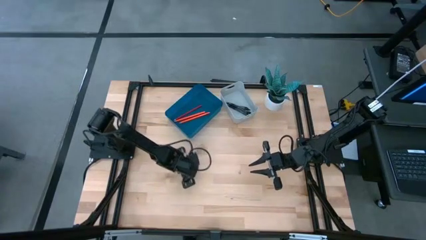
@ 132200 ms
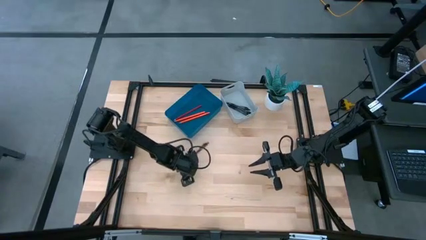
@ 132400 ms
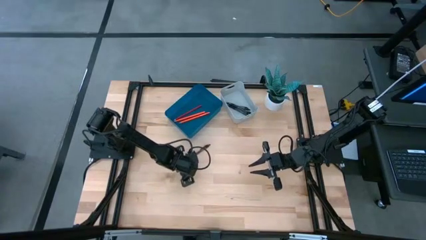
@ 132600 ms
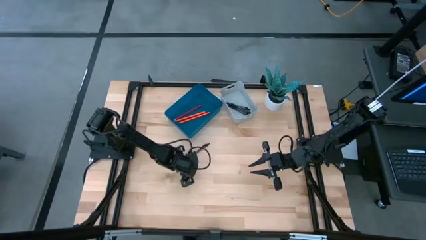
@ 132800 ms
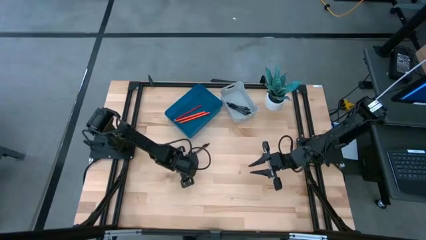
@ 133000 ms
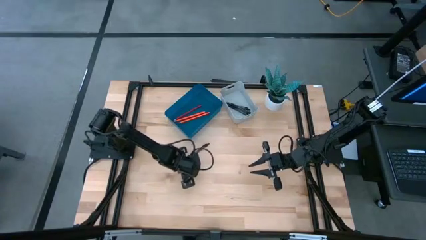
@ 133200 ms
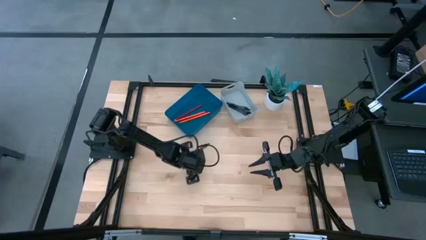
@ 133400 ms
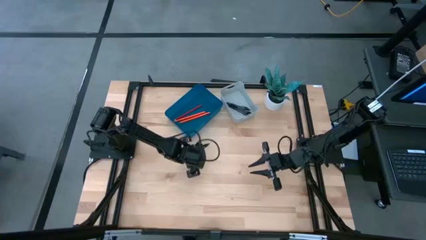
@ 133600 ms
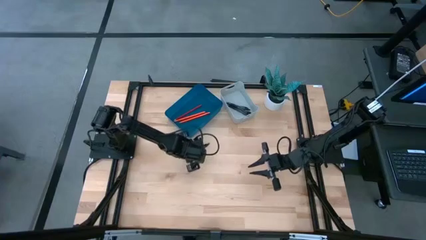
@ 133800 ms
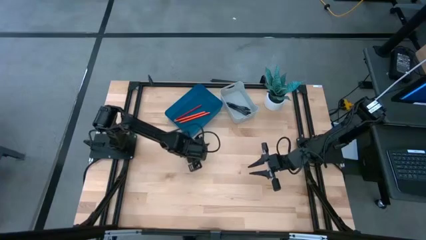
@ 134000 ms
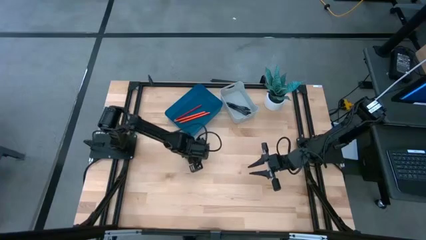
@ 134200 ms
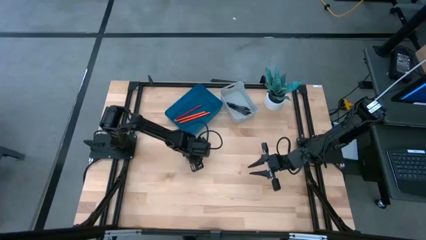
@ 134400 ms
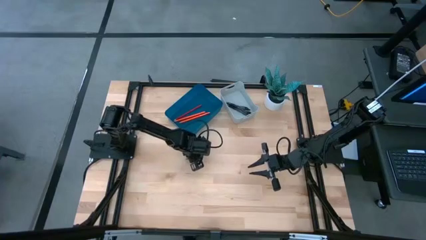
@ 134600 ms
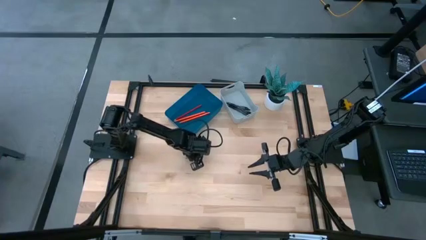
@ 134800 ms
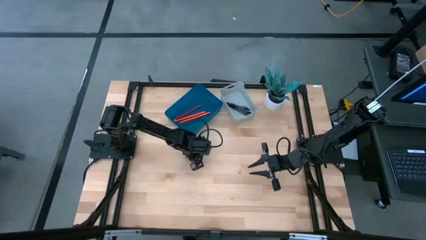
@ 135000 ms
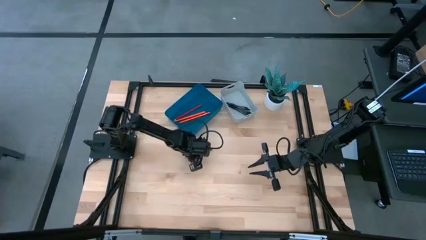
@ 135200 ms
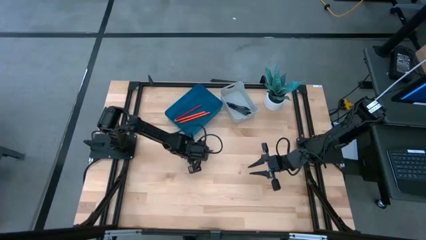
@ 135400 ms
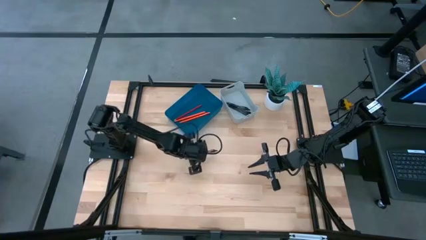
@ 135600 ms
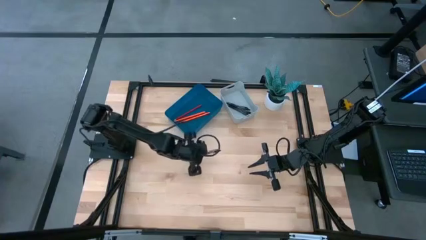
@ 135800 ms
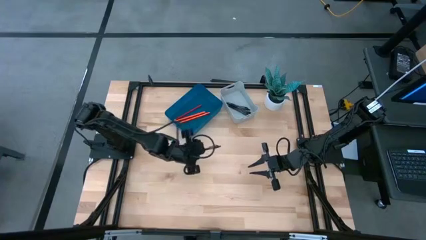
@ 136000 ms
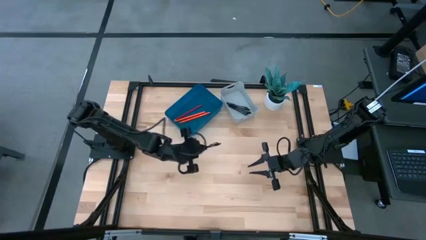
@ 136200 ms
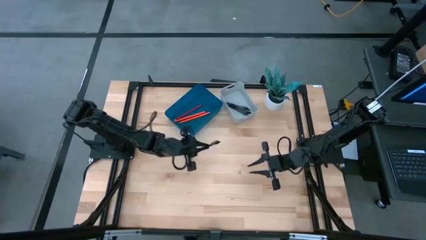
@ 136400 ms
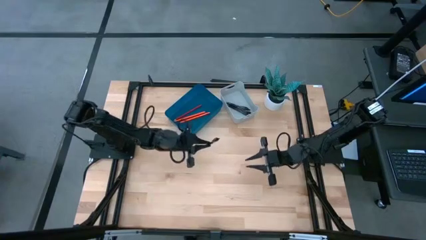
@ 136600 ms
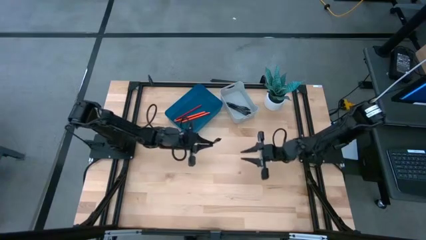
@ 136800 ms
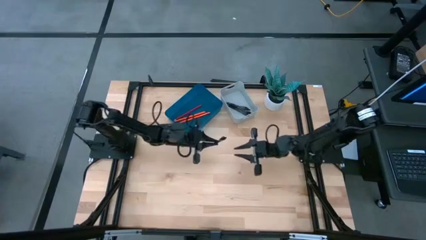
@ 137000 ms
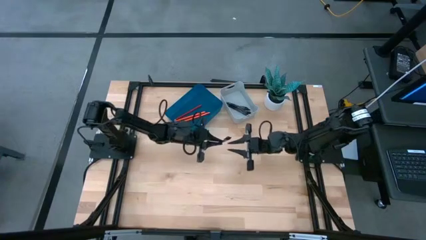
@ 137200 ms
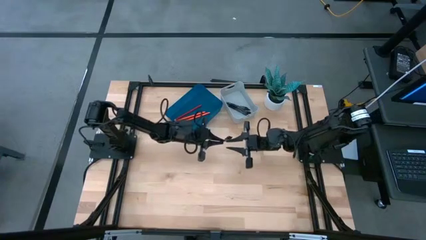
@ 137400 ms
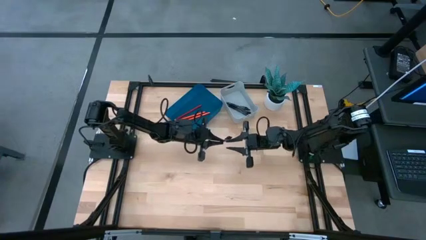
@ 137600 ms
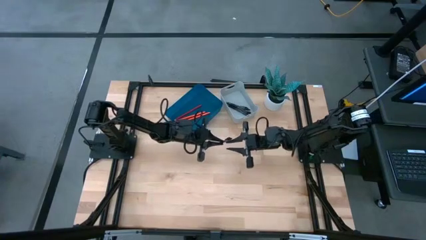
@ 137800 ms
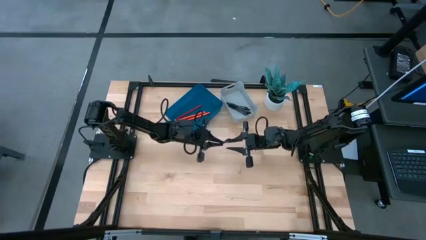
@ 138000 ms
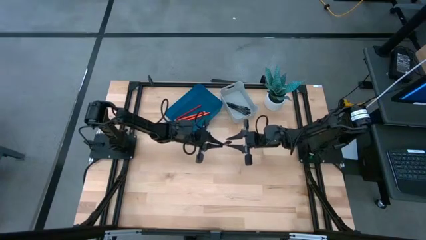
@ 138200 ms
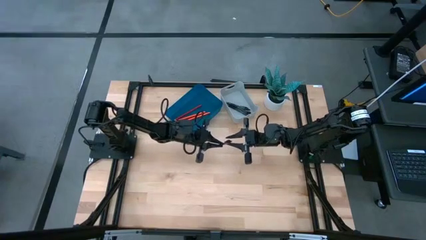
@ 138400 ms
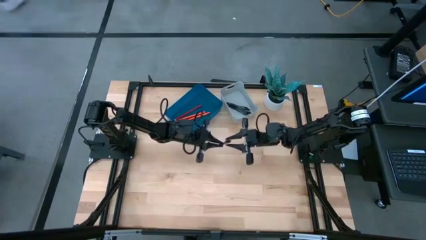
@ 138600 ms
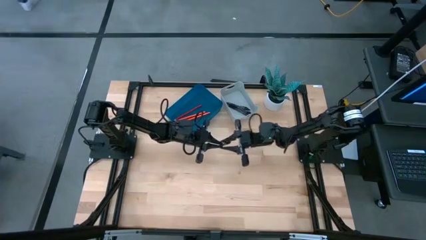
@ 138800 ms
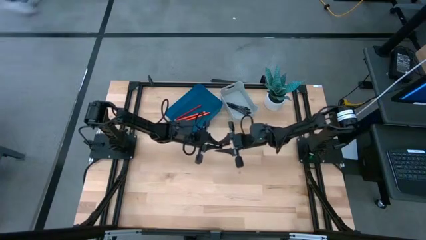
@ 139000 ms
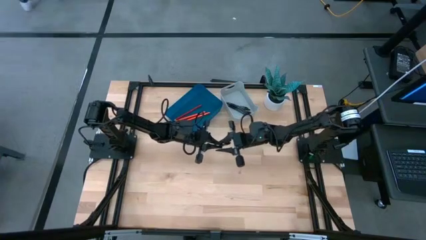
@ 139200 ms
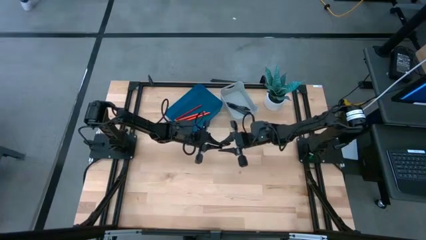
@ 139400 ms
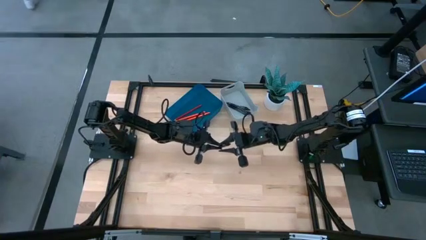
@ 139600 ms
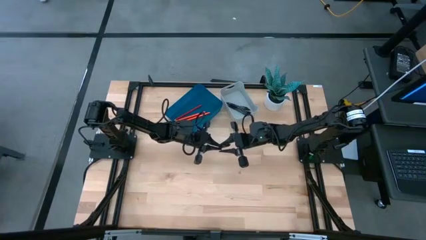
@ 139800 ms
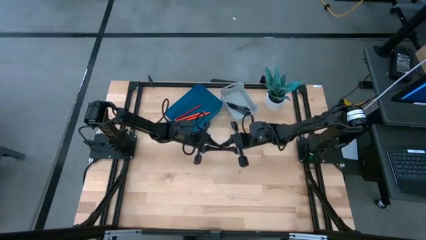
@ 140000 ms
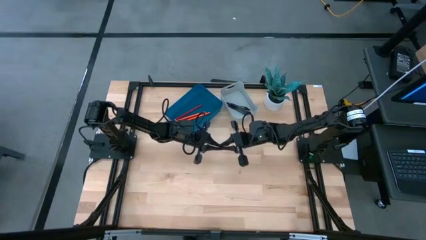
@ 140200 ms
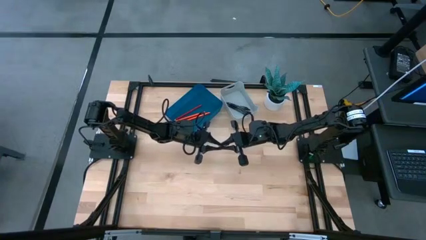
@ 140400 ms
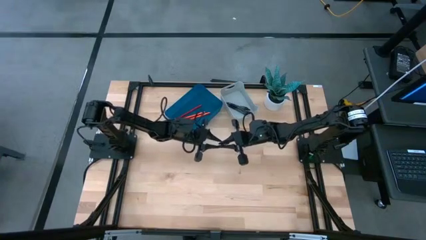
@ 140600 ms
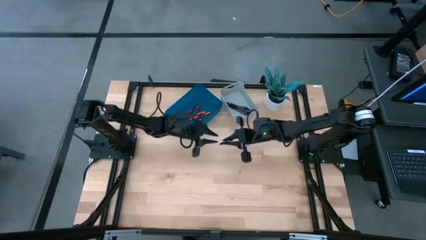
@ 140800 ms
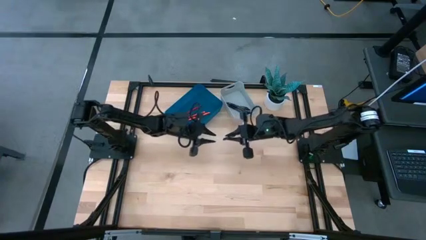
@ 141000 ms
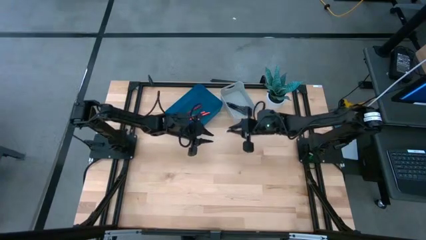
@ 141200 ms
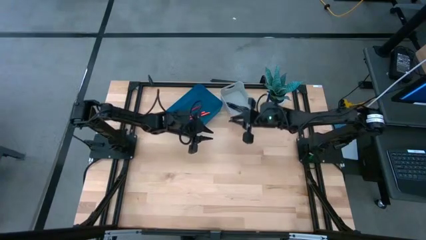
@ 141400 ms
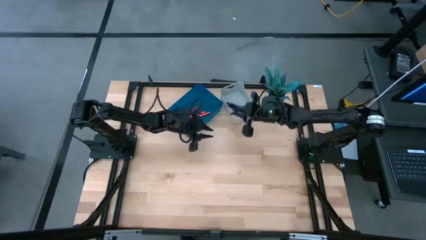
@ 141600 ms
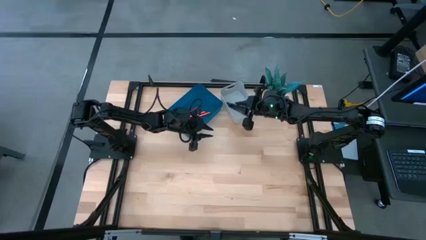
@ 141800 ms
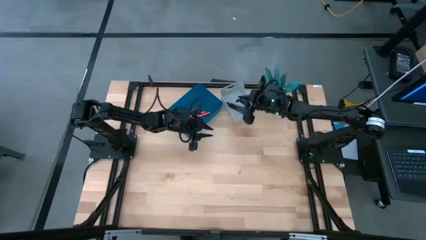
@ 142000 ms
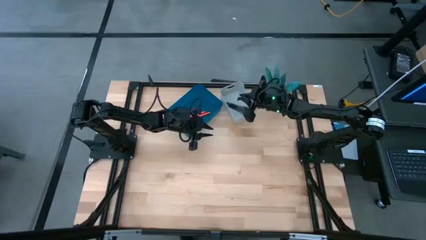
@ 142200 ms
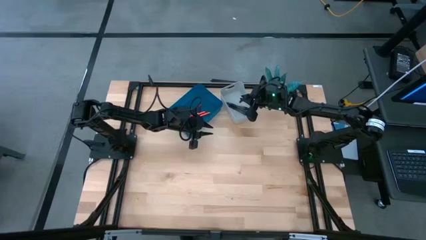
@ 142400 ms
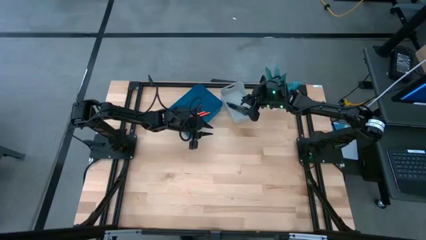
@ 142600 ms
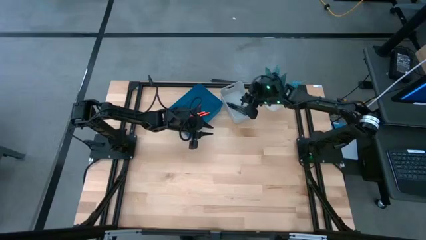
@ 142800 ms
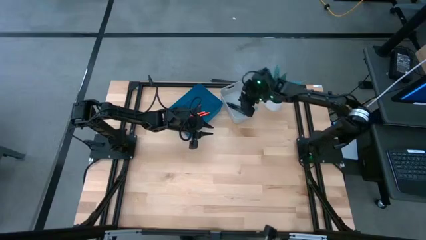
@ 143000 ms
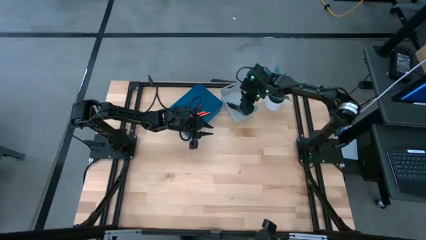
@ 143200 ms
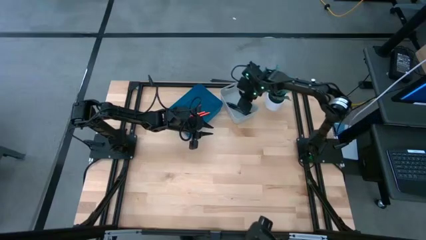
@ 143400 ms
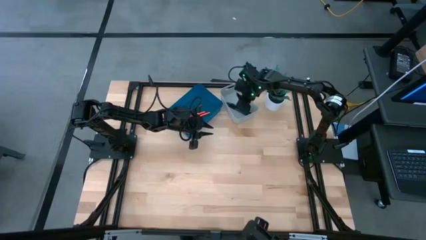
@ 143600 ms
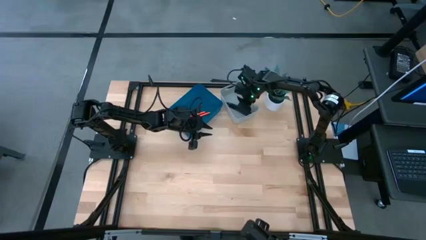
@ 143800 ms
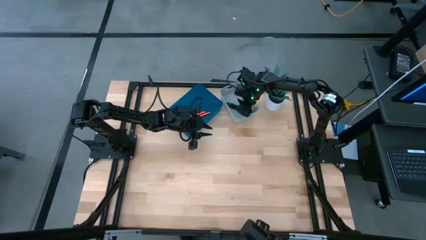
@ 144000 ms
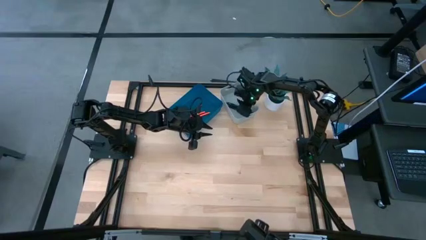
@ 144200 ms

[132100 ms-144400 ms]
Task: Sort pens & pencils
Put the black pen into the gray bin

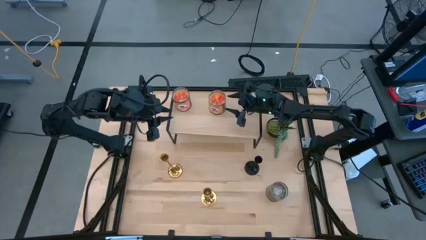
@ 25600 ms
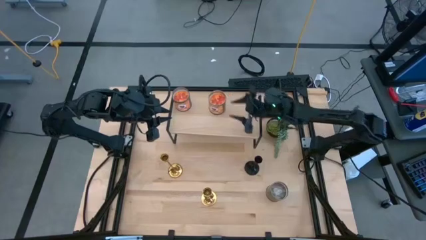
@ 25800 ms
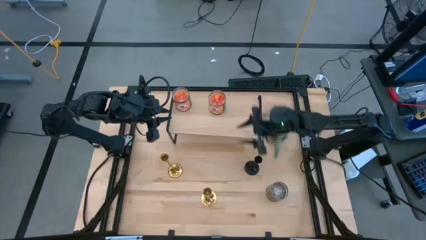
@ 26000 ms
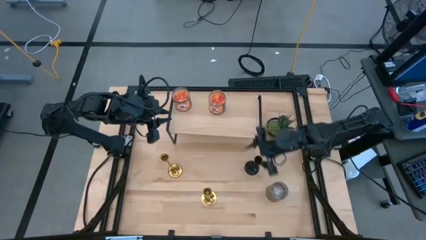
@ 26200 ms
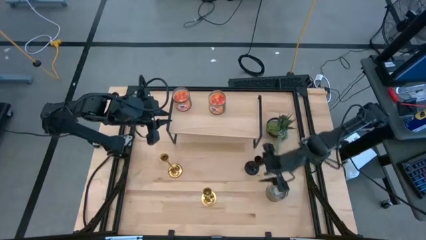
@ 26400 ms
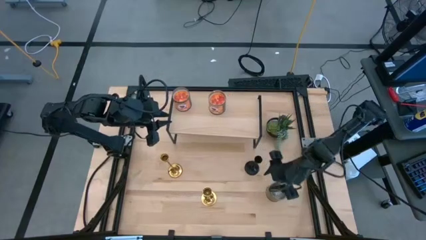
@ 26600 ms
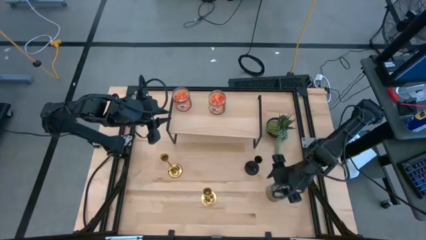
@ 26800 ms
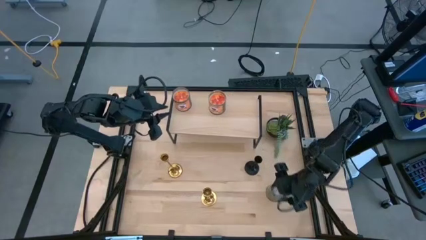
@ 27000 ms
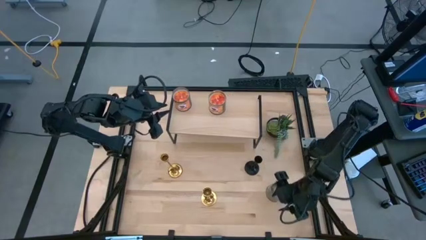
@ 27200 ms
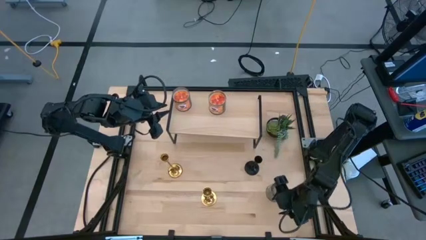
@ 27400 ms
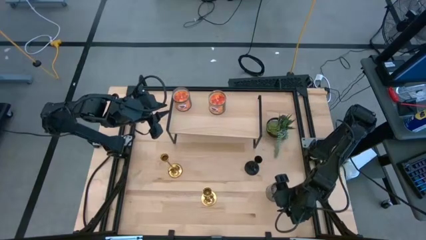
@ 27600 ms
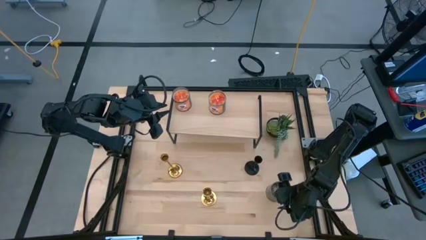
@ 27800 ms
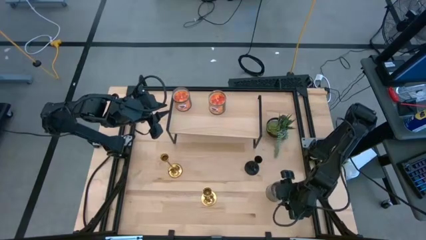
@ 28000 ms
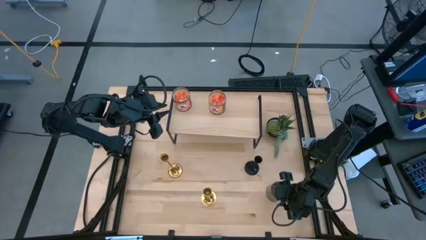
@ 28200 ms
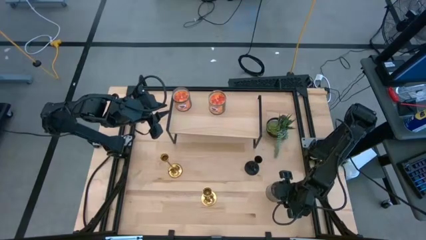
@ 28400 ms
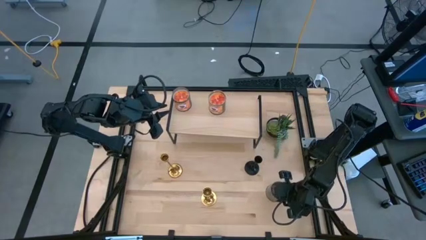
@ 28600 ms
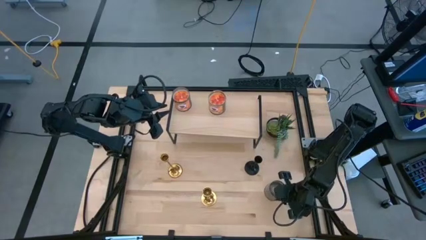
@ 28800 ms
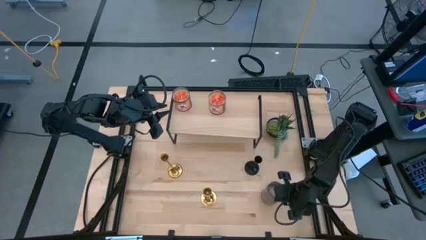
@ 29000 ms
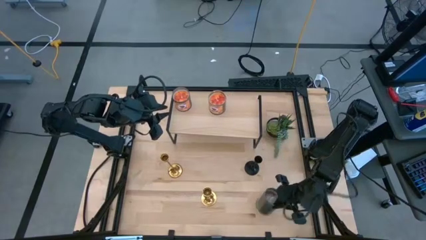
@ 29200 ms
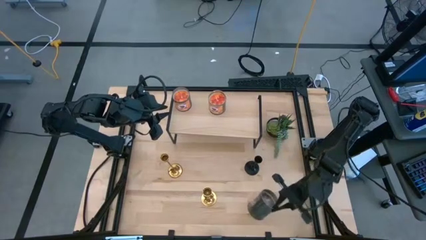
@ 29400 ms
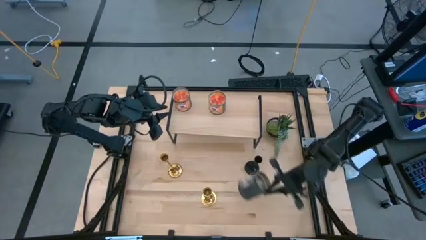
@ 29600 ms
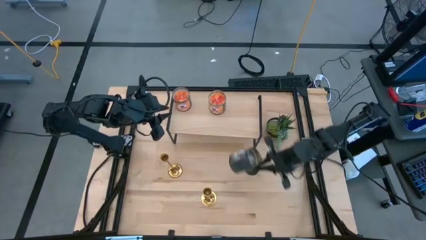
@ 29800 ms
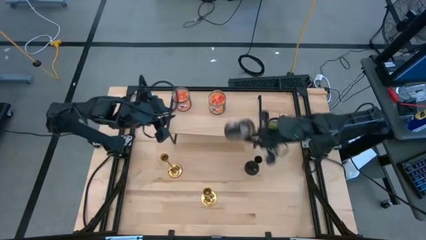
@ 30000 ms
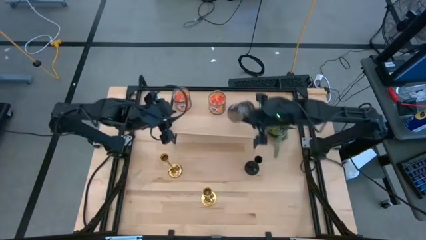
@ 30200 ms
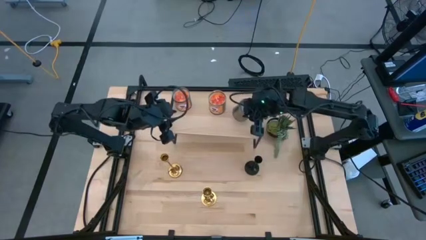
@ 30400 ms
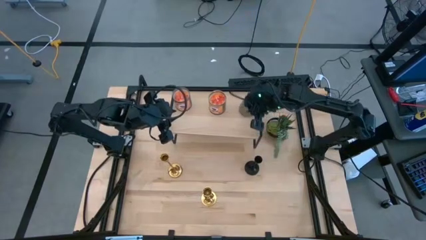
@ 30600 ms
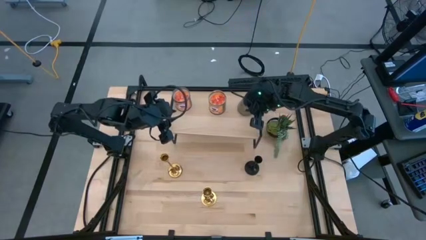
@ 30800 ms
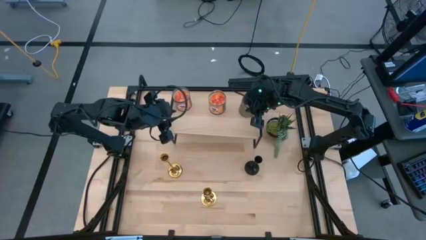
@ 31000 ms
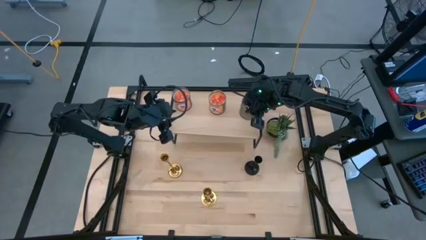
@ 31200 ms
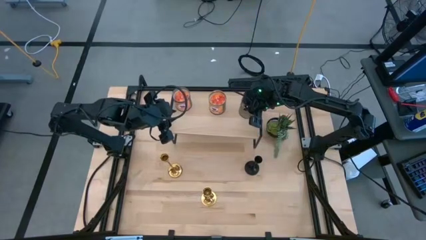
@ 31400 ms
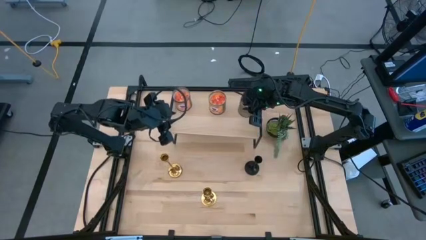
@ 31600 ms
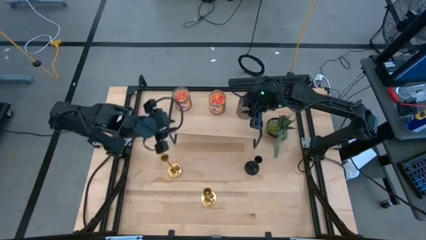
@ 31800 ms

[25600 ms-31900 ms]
Task: Pick & Place candle stick holders
Put the brown scented candle on the shelf
